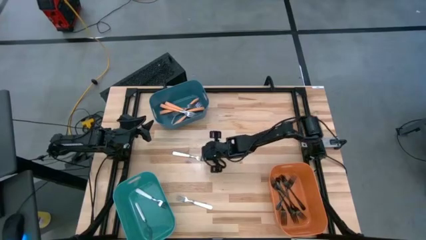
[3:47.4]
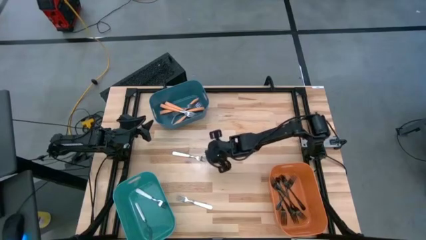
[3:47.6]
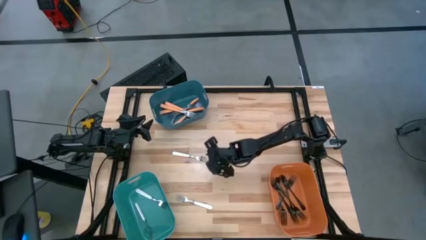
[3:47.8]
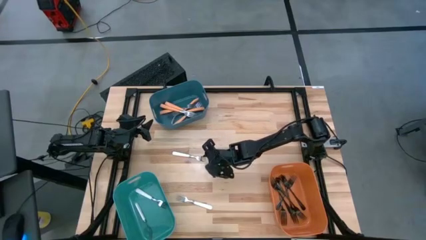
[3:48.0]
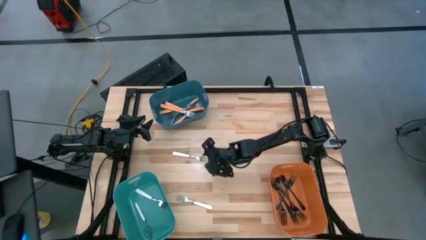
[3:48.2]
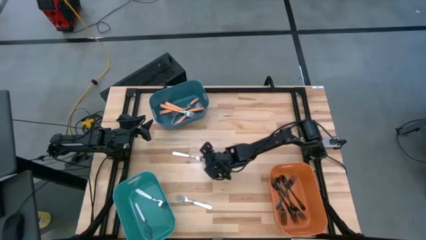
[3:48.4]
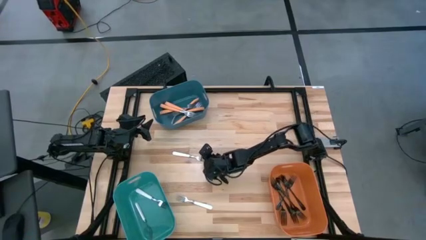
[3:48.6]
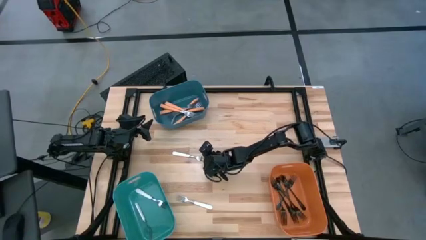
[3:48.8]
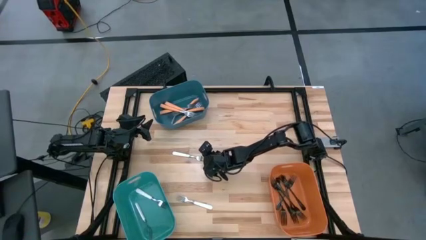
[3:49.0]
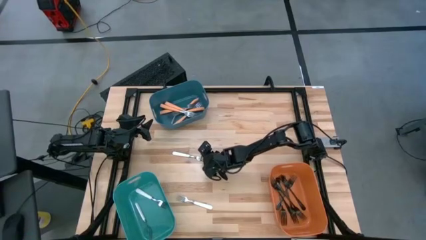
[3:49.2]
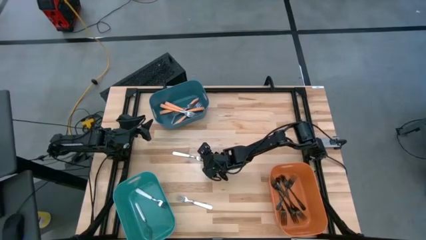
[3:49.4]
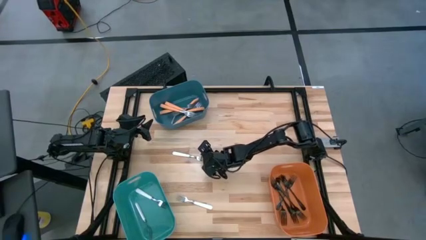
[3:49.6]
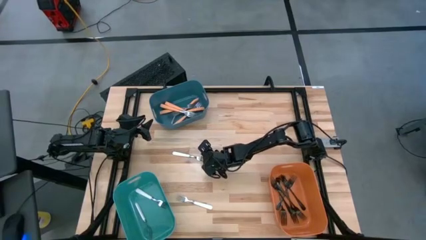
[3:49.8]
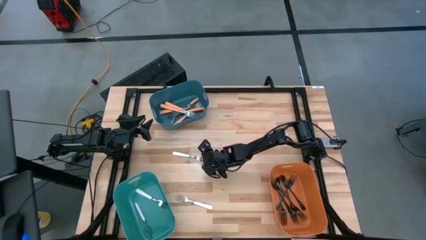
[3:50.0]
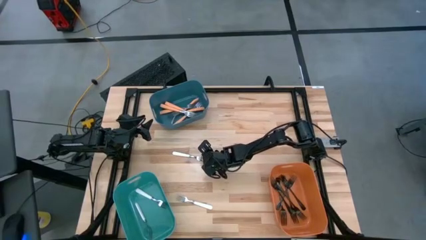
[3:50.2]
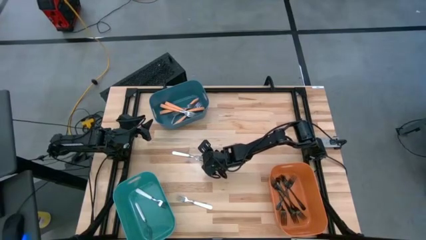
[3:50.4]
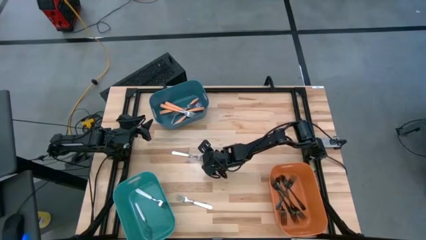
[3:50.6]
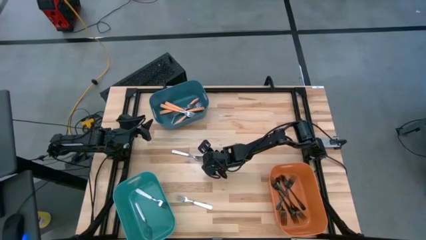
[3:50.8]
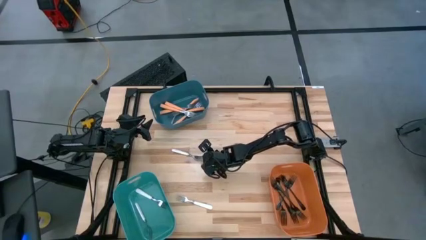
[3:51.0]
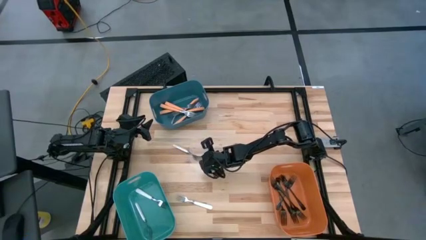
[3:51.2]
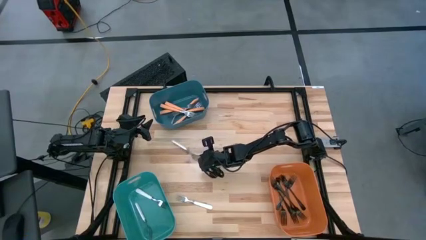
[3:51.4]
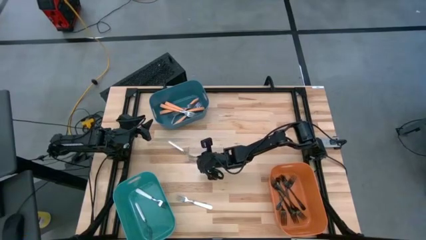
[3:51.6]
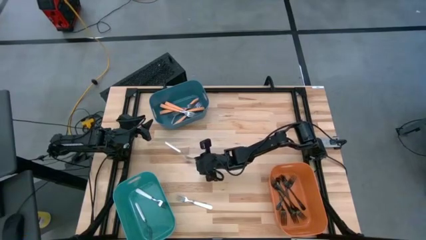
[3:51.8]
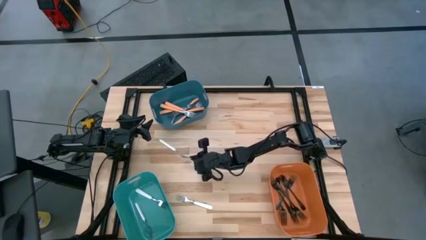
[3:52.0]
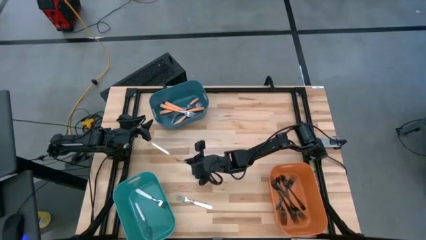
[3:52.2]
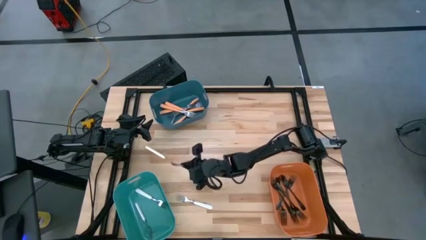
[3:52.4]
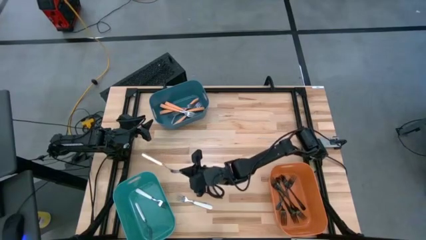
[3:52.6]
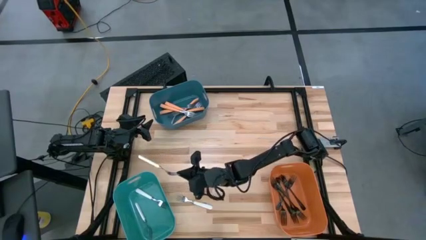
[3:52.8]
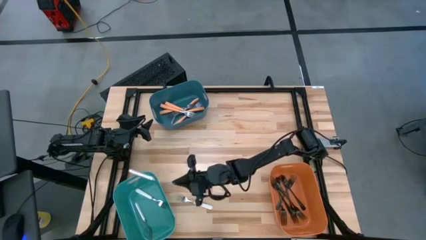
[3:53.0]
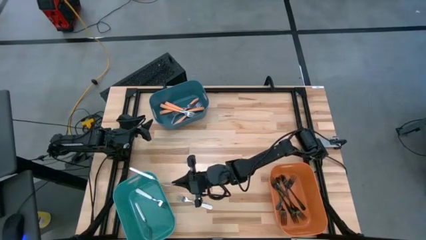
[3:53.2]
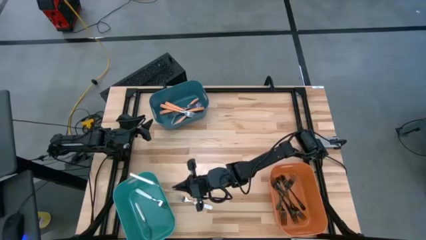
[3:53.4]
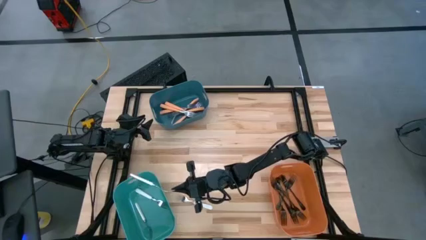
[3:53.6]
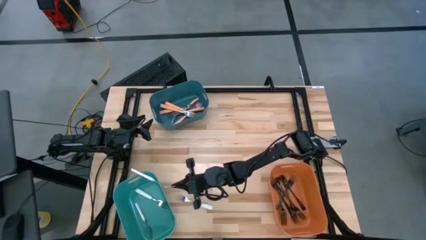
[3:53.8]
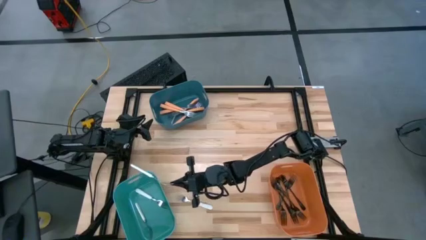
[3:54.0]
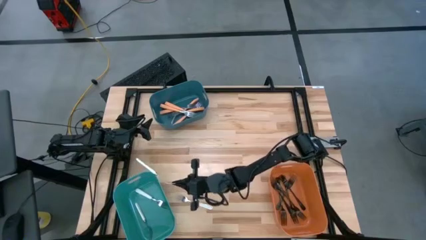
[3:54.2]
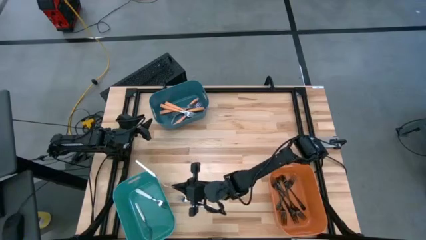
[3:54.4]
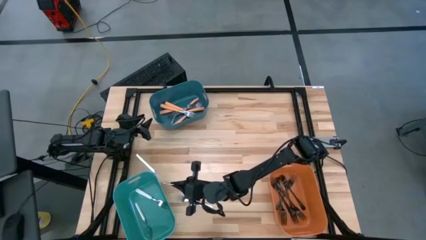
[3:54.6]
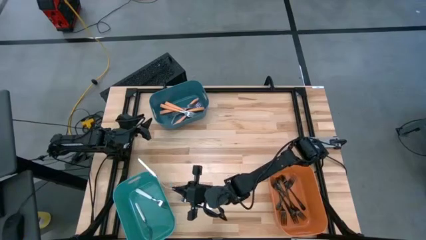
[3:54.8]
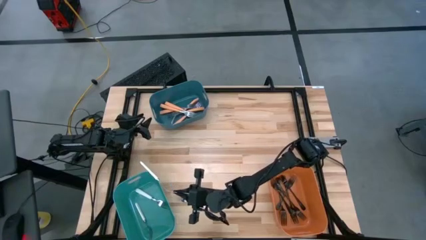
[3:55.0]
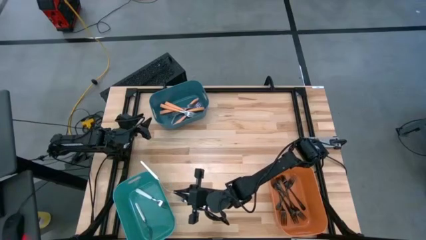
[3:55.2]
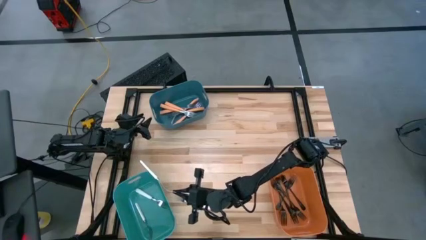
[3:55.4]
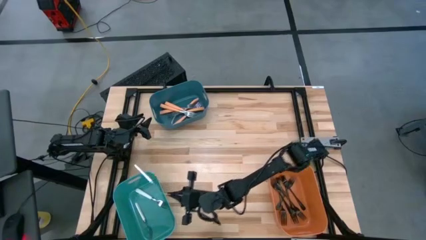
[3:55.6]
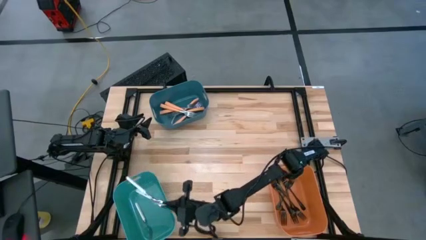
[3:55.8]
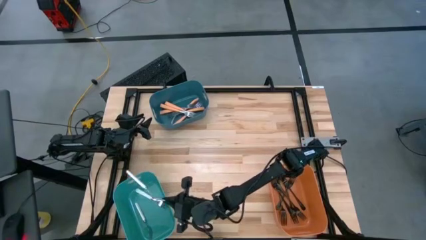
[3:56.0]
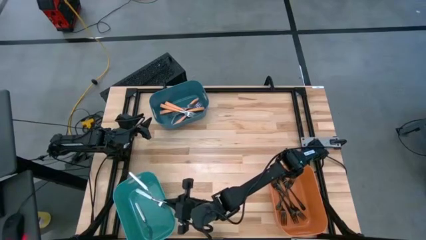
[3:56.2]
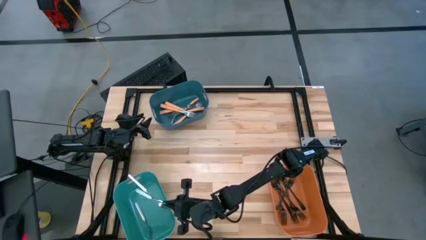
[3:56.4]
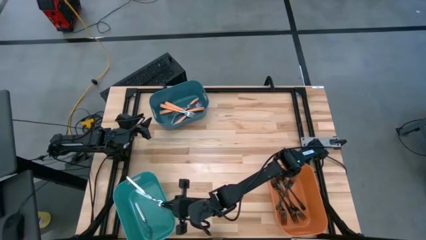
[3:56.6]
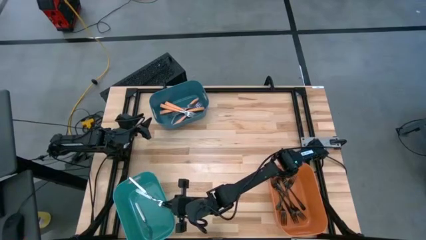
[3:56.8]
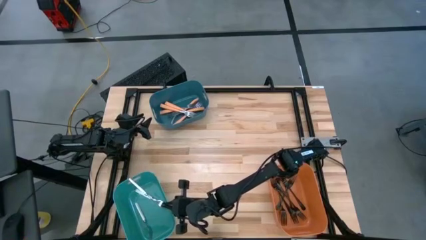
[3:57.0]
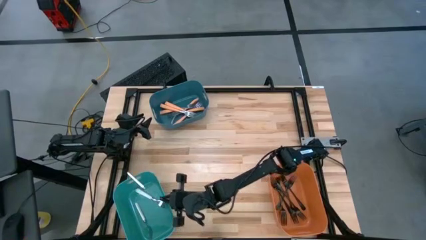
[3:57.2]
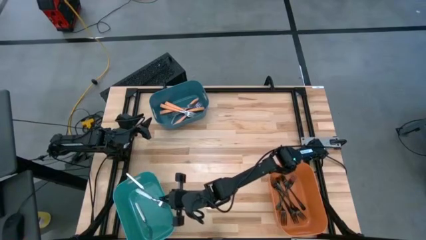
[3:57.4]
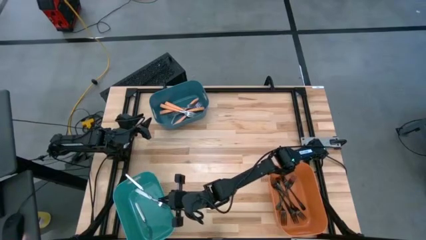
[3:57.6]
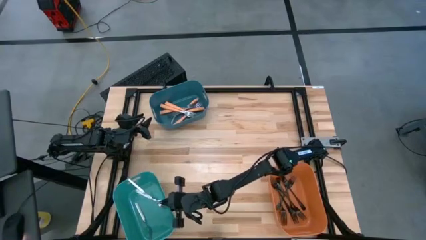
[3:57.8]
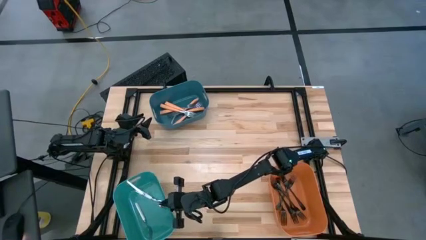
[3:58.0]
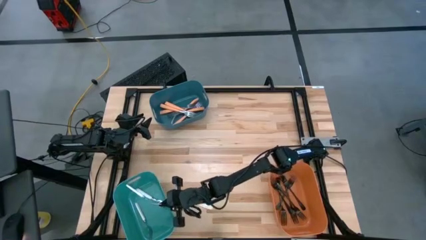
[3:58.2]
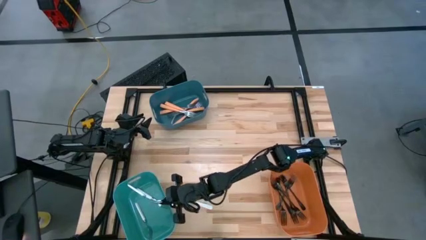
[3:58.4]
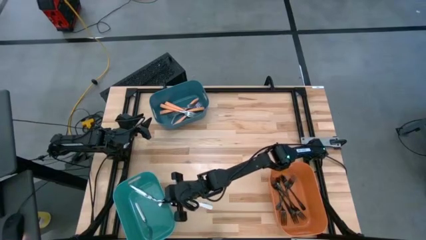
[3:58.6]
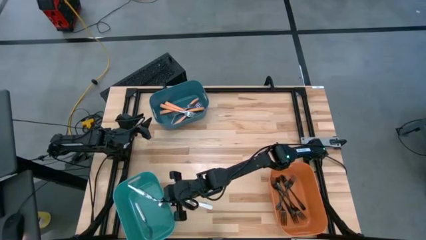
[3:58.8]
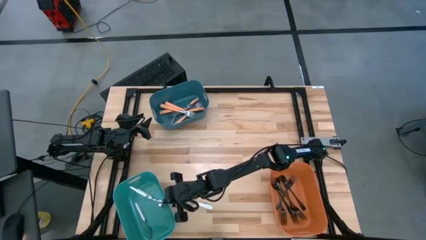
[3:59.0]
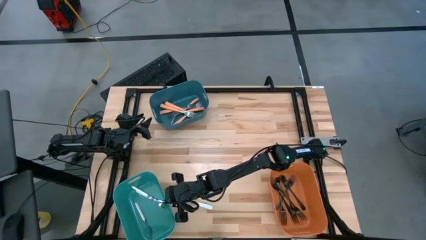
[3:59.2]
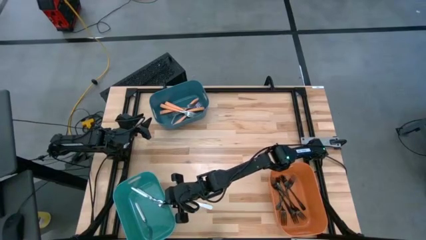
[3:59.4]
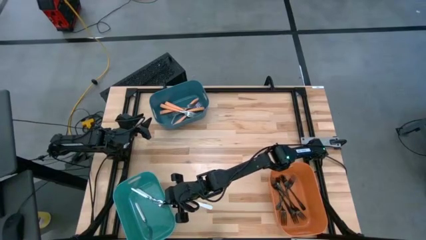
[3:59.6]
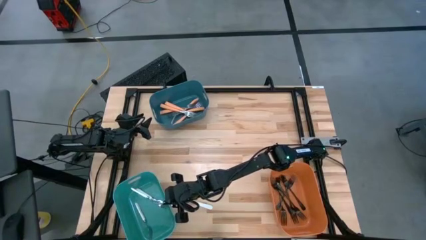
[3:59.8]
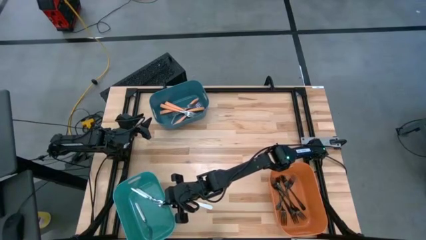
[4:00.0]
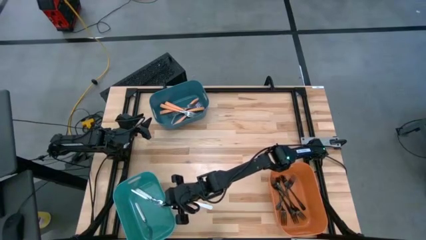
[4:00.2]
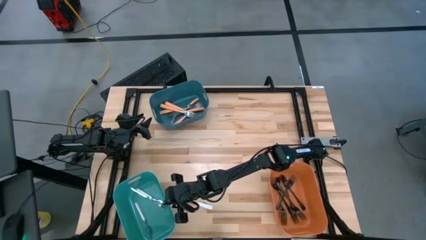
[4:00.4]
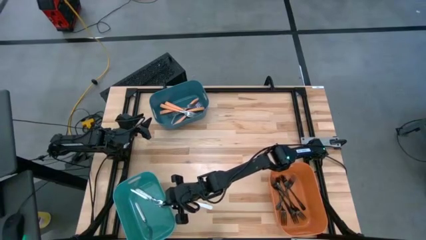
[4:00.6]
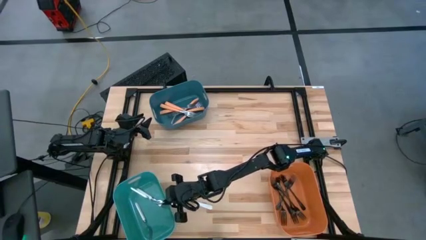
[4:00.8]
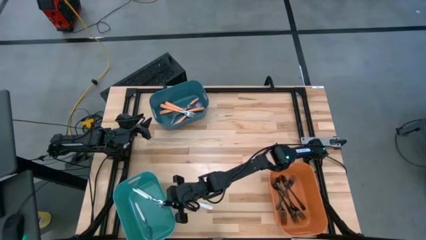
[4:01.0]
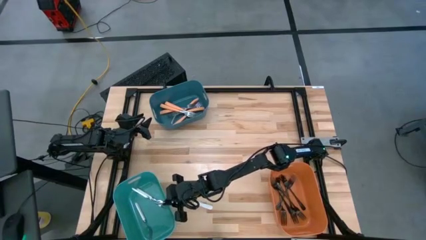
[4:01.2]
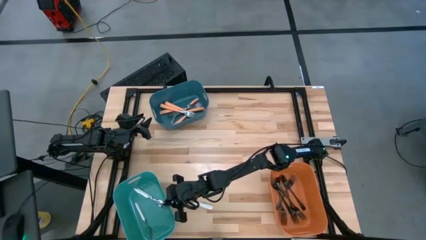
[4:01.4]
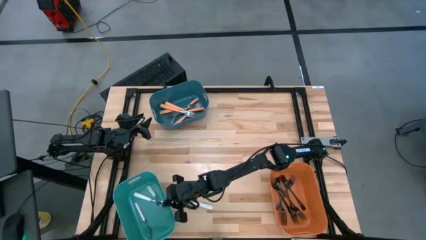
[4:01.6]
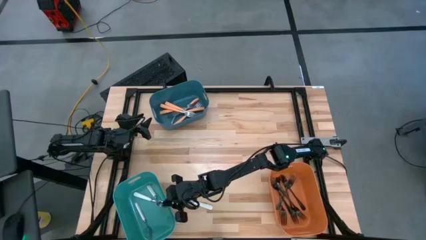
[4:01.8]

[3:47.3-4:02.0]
Task: Sort silverware by color (type)
Put the white fork into the green bin

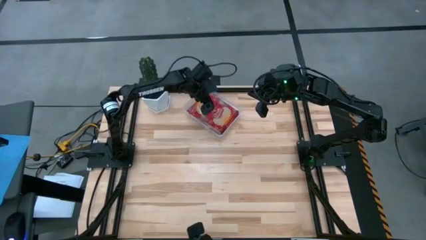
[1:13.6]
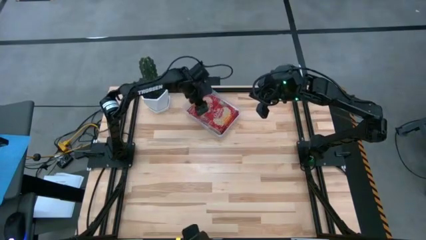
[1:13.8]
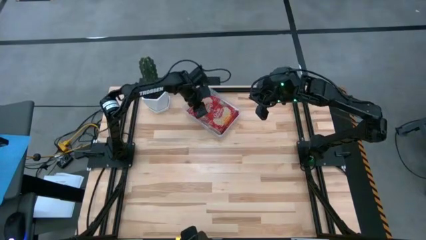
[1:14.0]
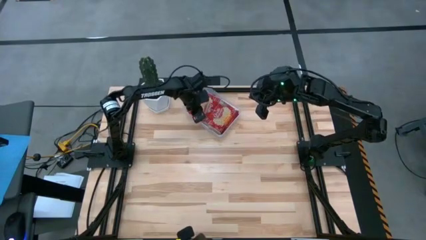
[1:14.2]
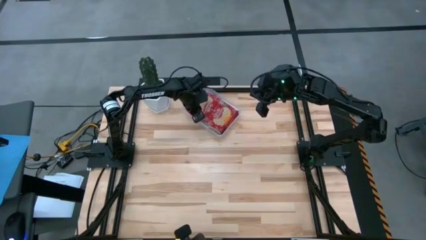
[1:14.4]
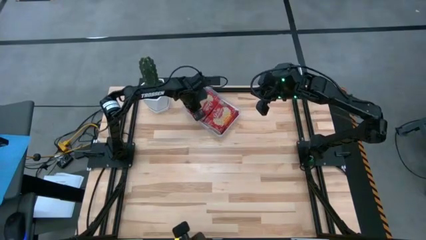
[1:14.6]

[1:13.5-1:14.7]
Task: Sort popcorn bags into baskets
Adjust the red popcorn bag
